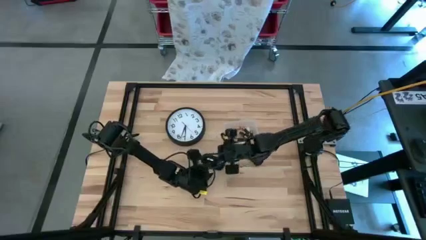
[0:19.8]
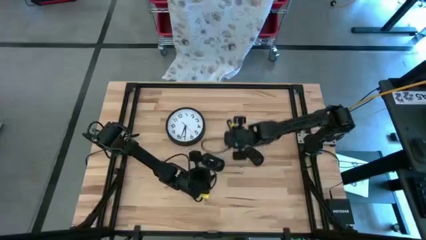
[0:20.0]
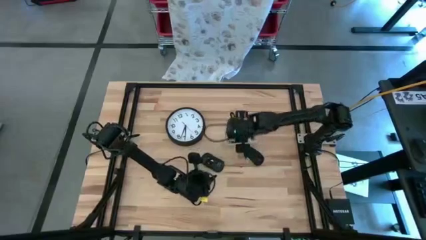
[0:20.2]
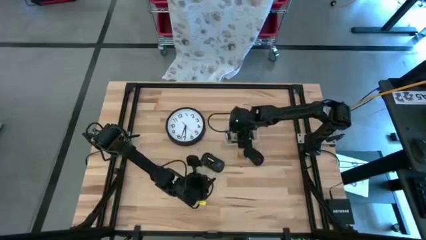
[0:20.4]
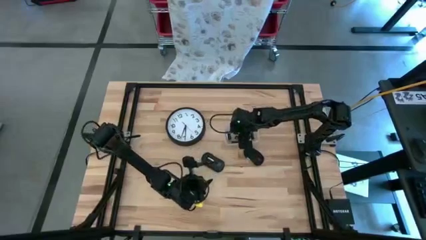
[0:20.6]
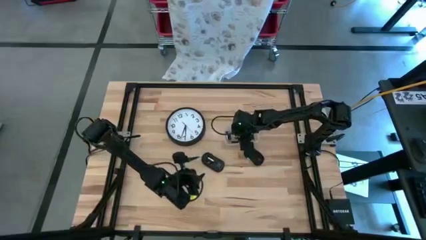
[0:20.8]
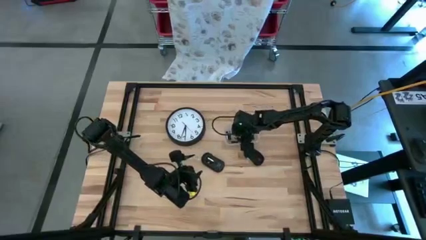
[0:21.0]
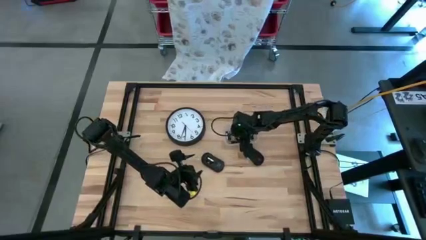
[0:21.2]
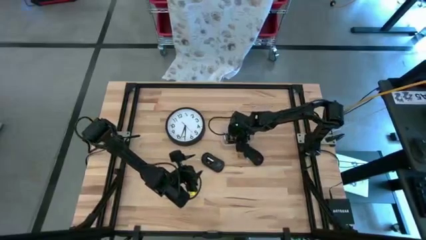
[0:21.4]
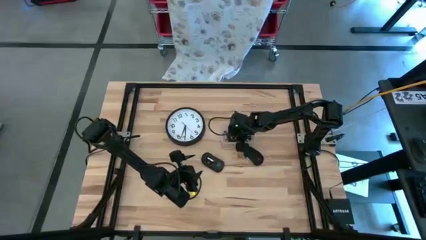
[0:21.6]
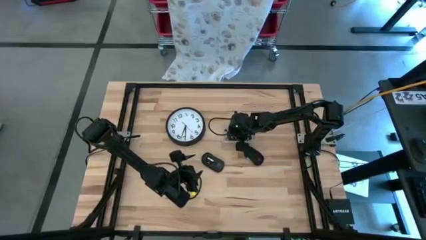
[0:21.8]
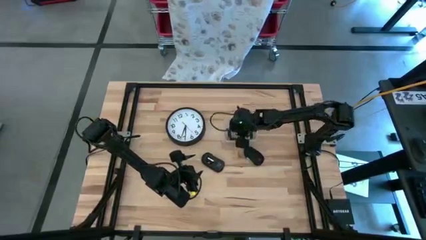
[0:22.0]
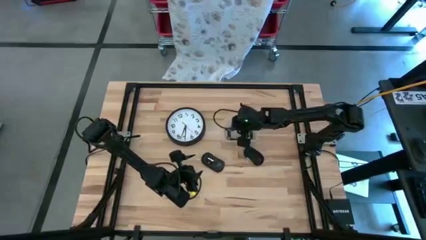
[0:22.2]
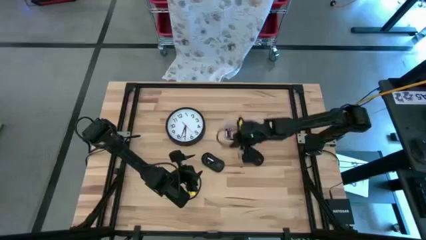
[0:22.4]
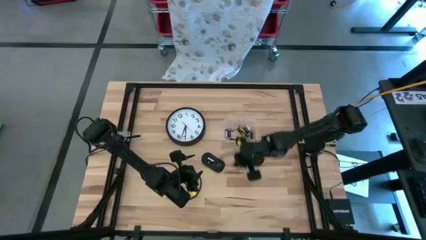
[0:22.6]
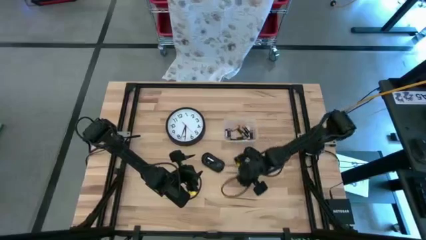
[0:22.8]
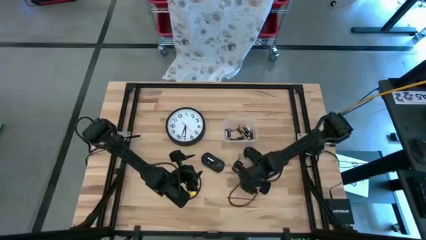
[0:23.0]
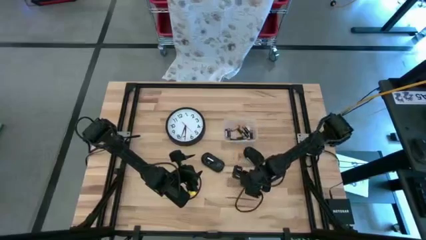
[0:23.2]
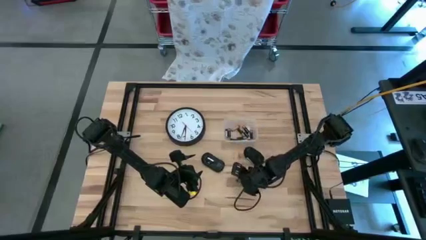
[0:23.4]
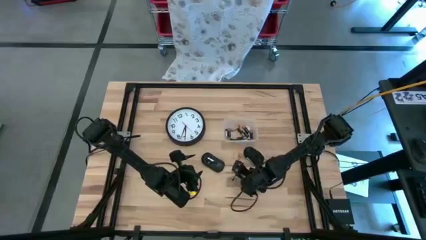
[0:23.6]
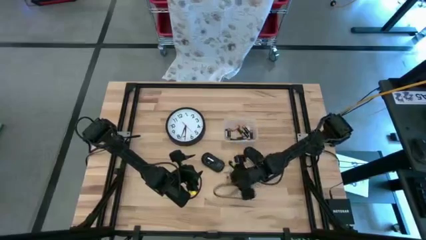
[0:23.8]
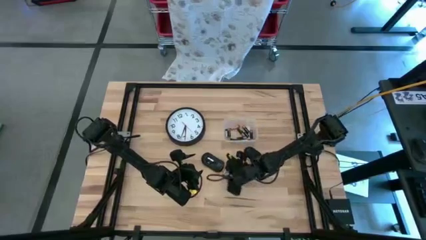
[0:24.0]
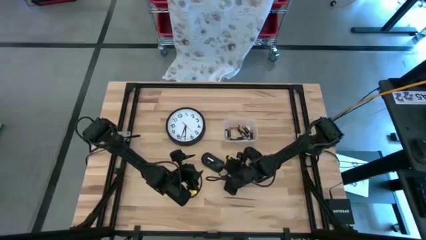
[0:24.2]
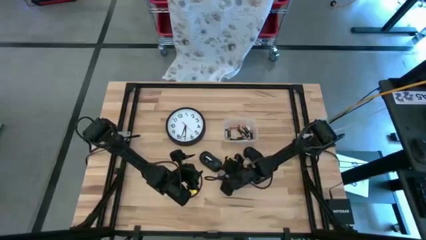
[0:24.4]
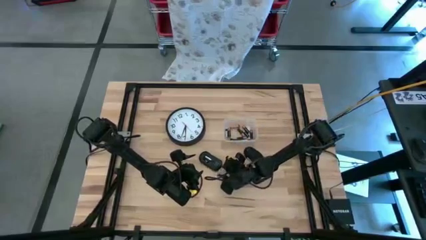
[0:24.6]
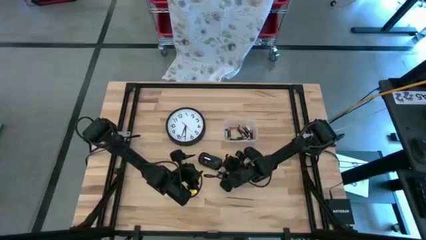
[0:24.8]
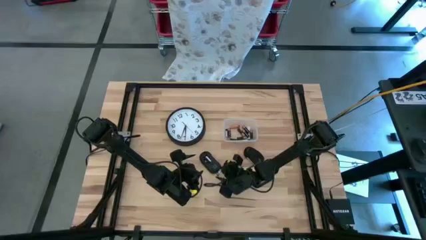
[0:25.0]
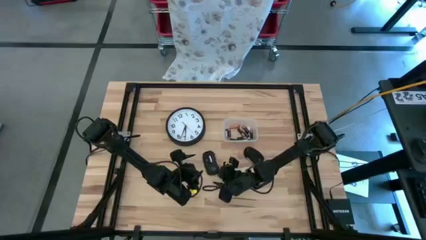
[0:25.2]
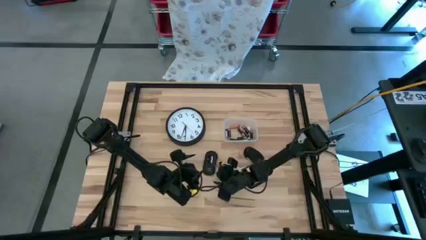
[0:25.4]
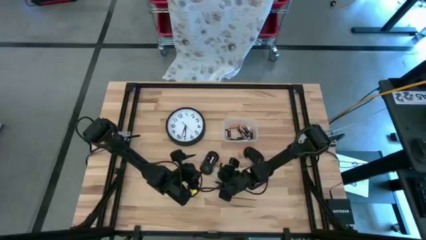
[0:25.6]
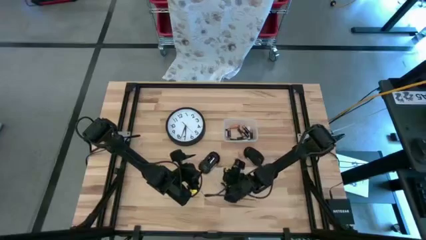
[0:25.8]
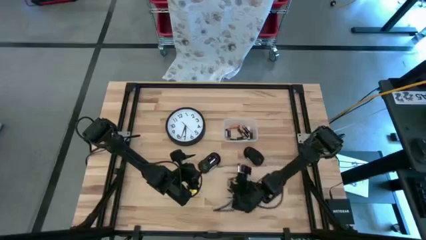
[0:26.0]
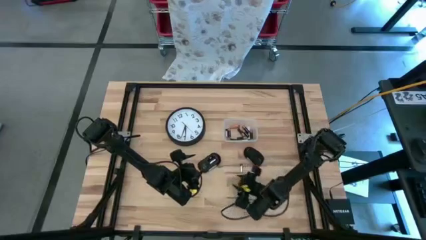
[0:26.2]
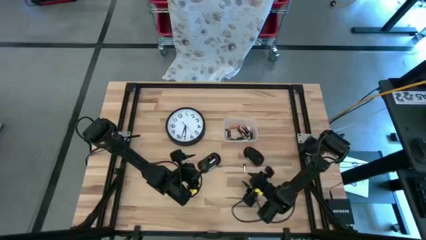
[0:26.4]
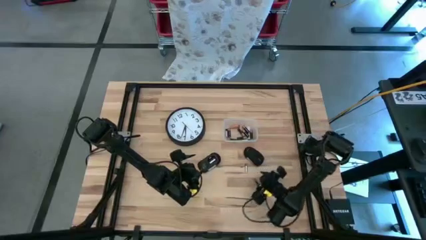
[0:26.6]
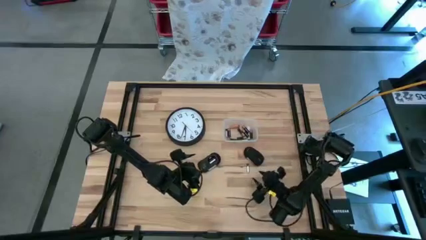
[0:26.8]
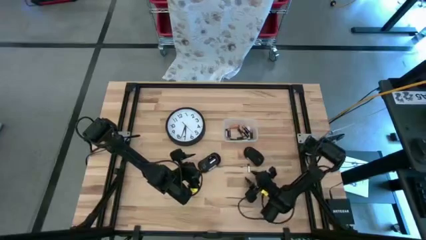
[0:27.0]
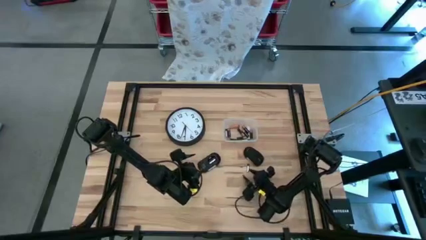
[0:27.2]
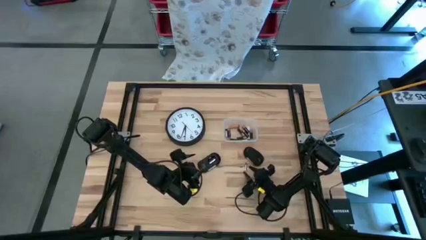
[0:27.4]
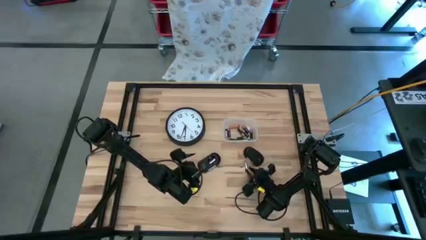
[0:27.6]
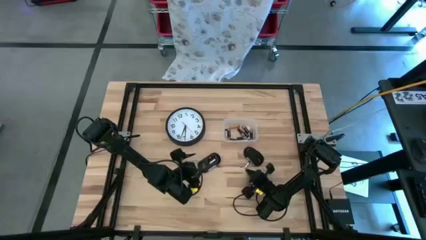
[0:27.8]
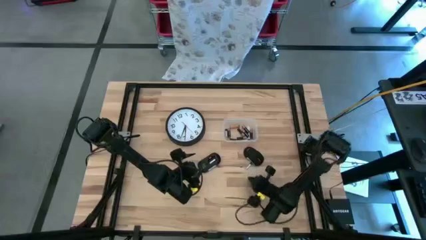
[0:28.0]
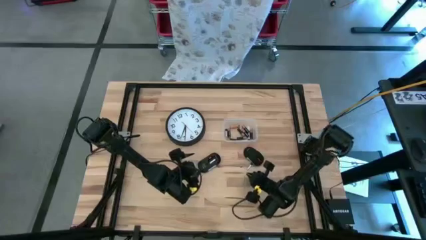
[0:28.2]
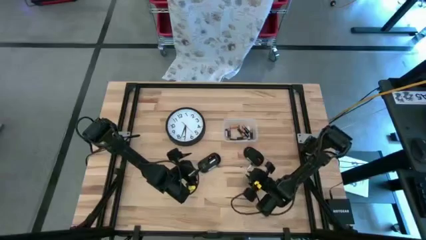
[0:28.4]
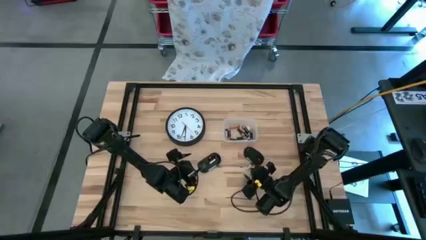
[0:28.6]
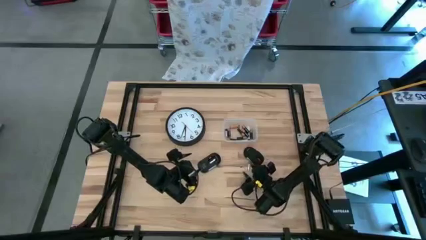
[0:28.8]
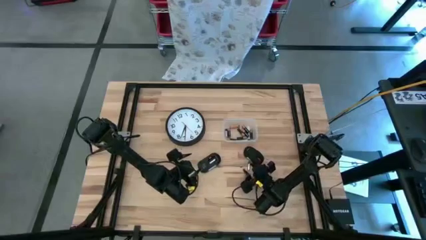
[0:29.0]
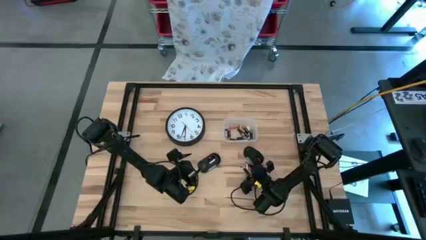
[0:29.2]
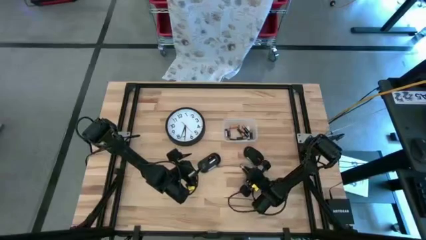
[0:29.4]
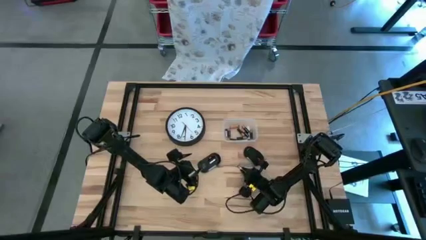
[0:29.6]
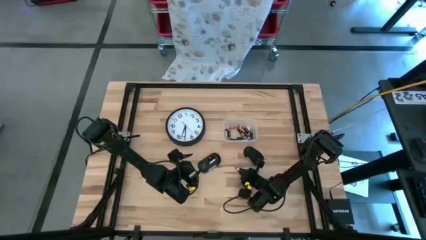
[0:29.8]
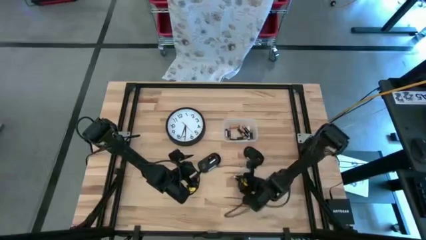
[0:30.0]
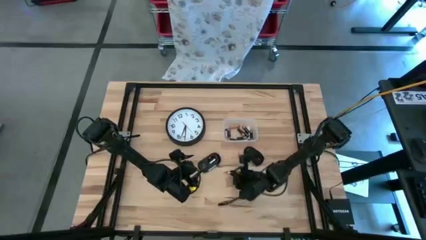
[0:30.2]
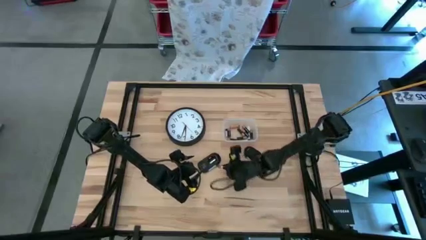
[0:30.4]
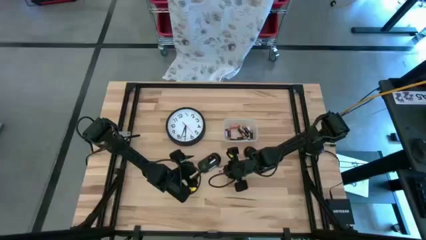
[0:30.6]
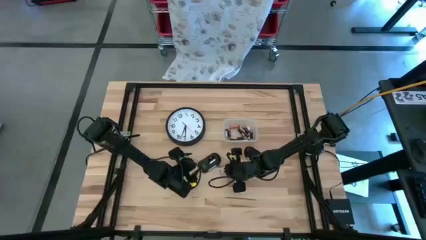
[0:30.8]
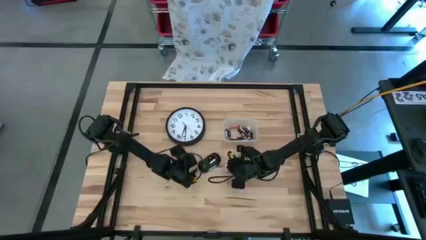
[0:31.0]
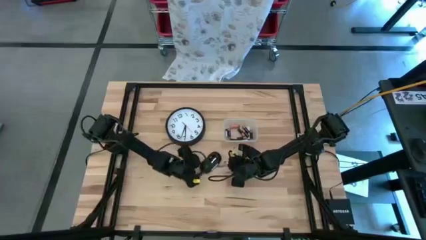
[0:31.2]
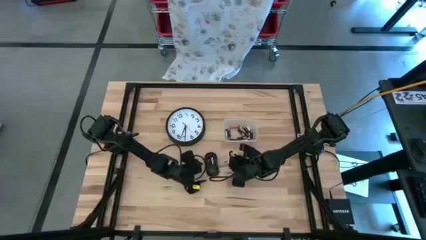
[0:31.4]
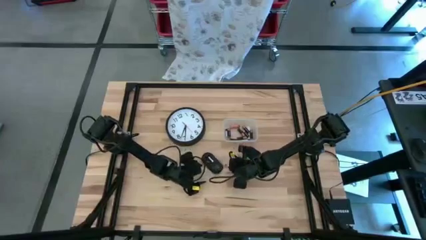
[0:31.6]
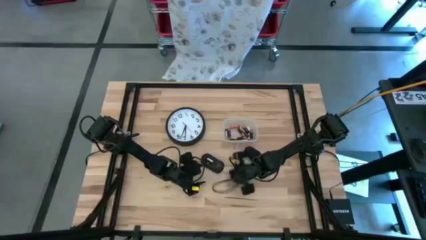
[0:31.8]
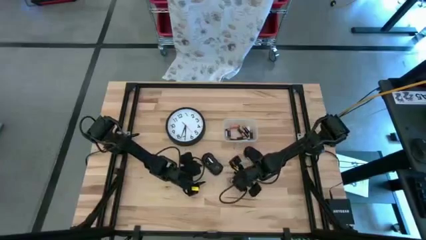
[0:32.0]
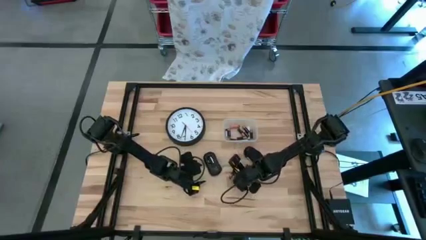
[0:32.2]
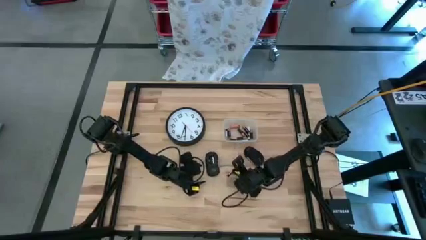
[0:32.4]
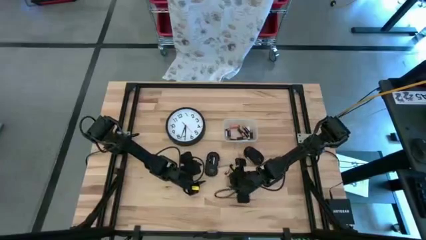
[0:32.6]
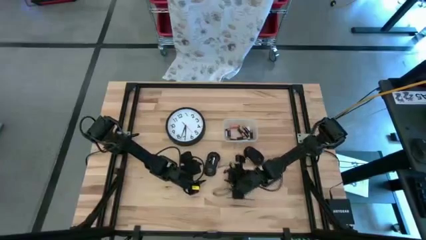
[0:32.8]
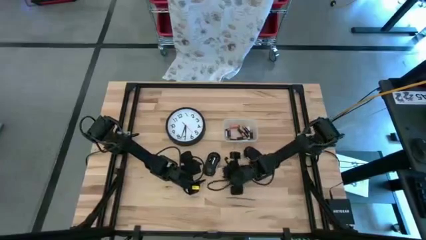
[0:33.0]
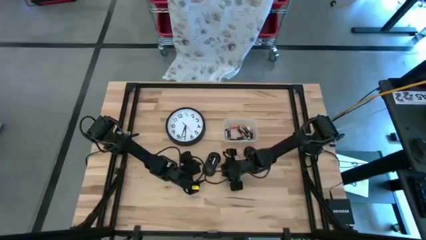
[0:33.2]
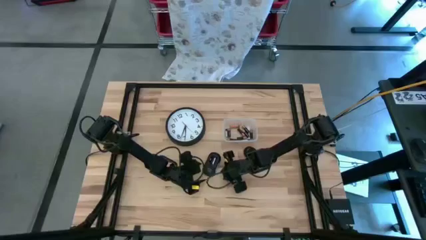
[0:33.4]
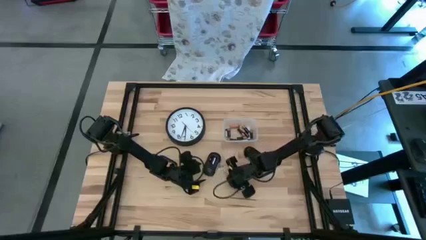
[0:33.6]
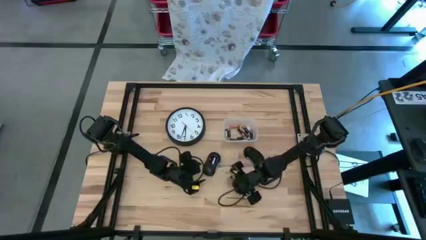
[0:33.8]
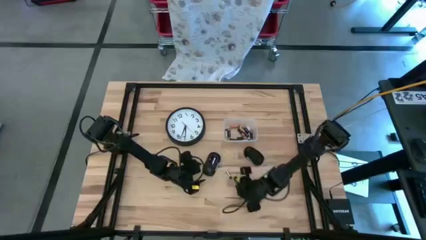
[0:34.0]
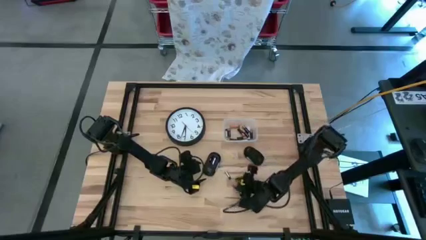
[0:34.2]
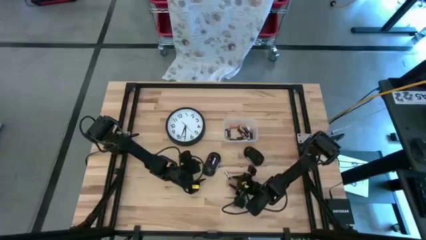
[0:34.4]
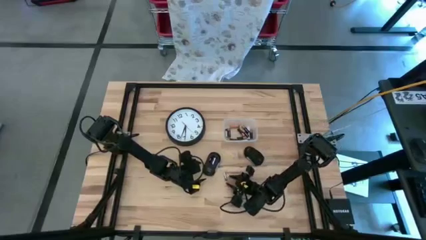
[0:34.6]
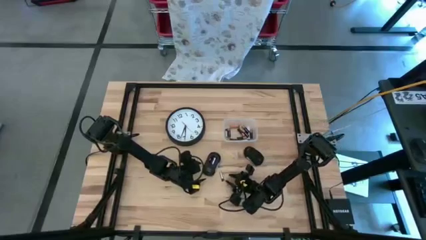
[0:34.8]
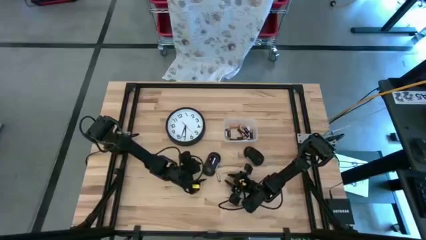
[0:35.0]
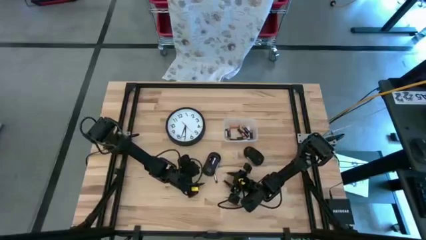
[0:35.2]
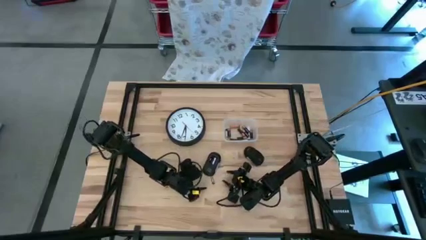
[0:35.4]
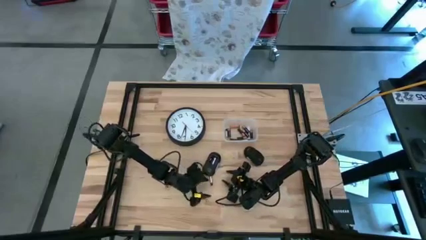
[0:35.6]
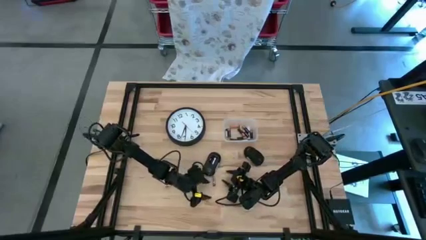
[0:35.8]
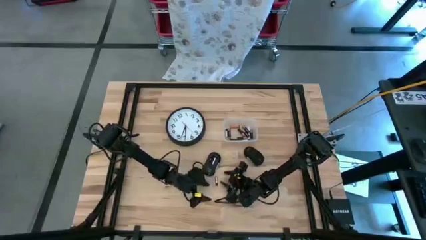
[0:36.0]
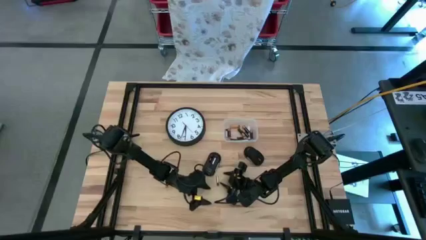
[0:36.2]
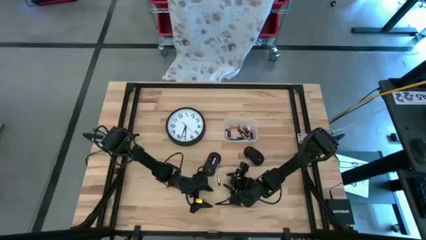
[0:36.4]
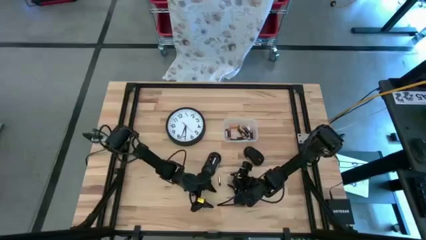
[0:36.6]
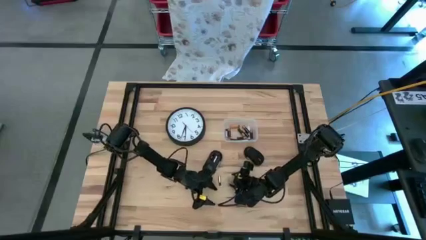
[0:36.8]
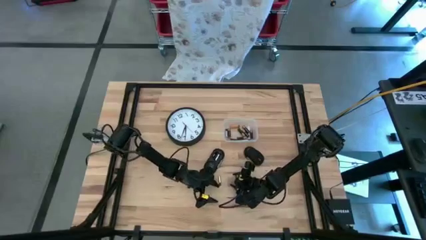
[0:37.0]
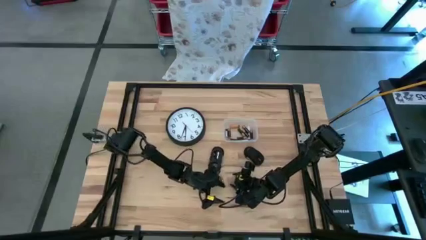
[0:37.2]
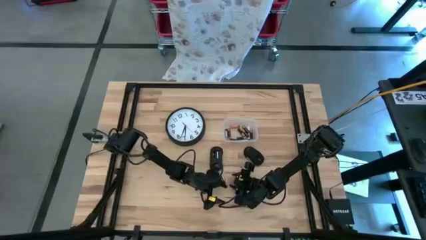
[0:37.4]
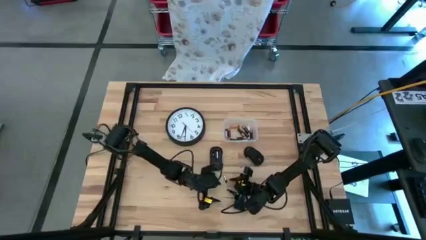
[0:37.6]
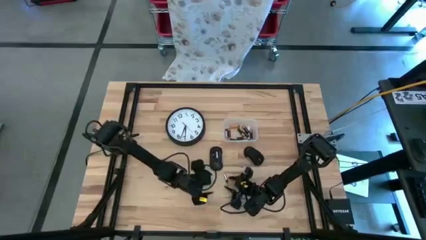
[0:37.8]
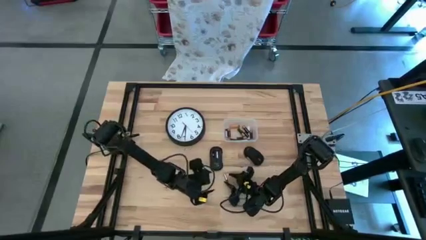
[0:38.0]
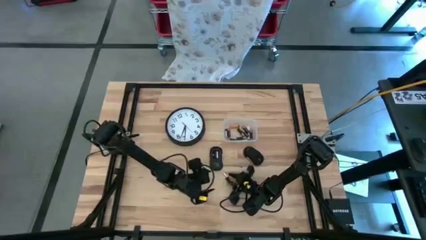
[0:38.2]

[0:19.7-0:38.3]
Task: Insert battery
Insert the silver battery into the left computer mouse
